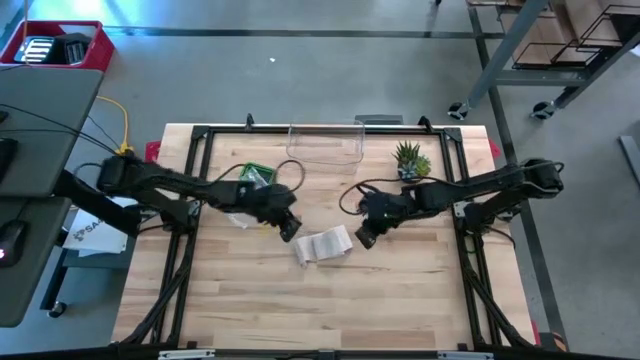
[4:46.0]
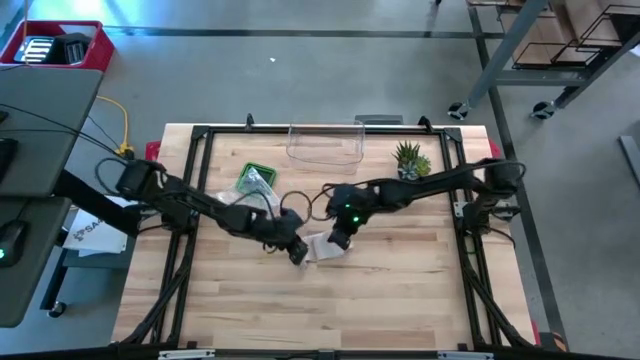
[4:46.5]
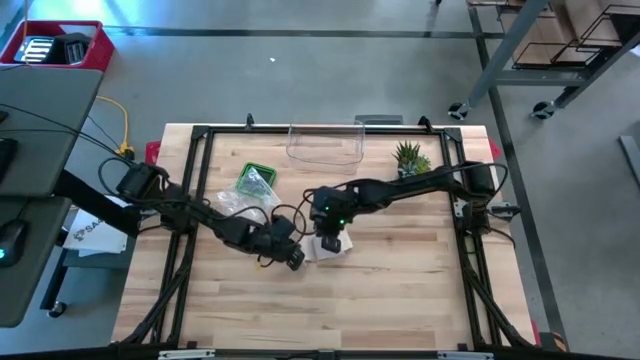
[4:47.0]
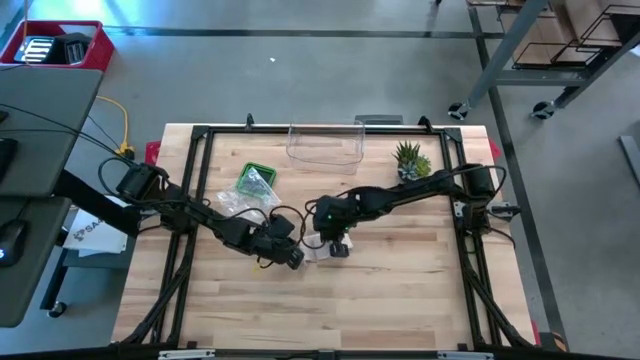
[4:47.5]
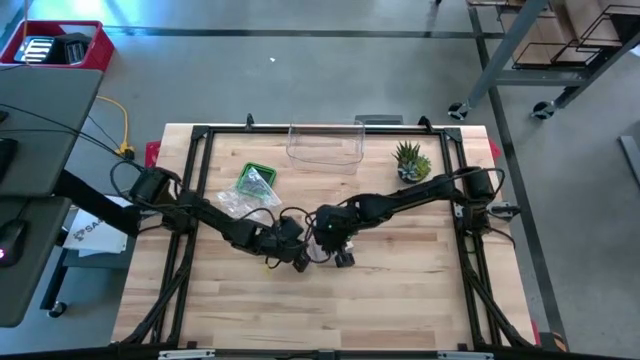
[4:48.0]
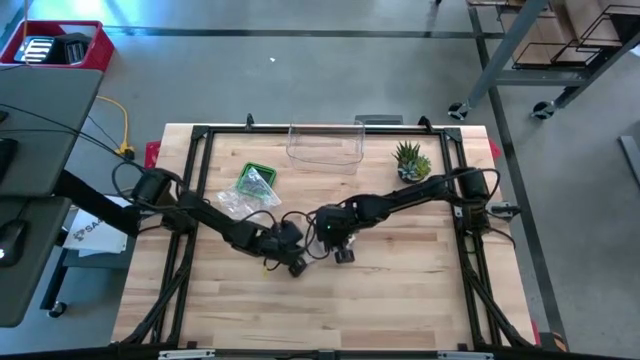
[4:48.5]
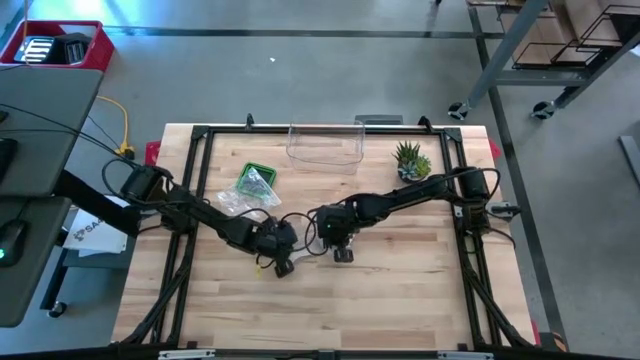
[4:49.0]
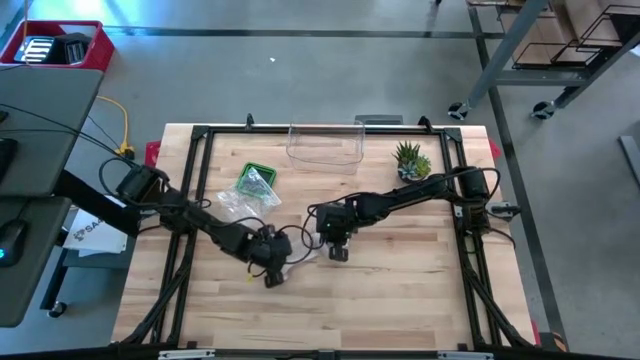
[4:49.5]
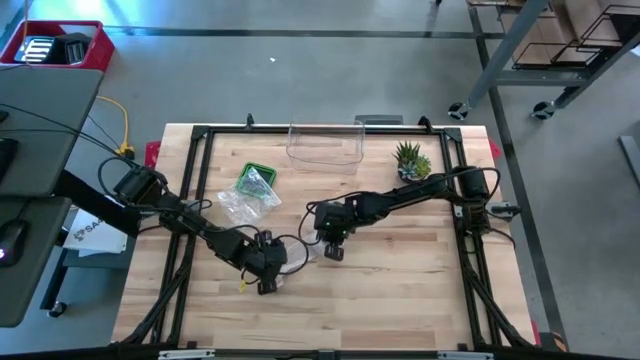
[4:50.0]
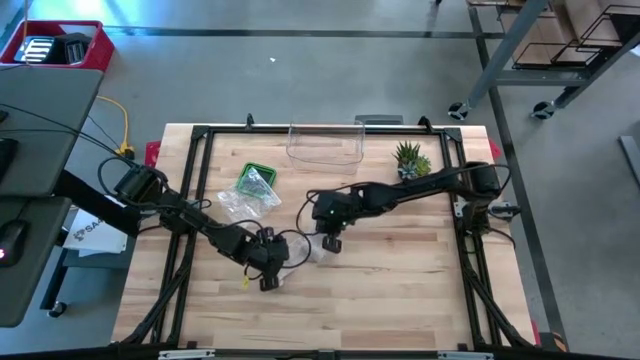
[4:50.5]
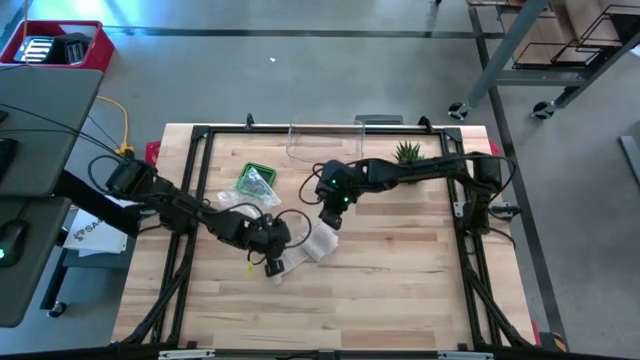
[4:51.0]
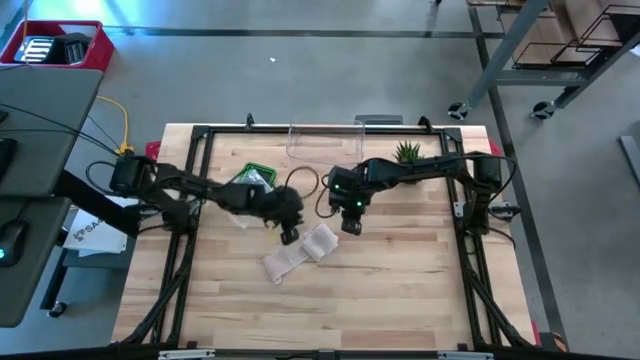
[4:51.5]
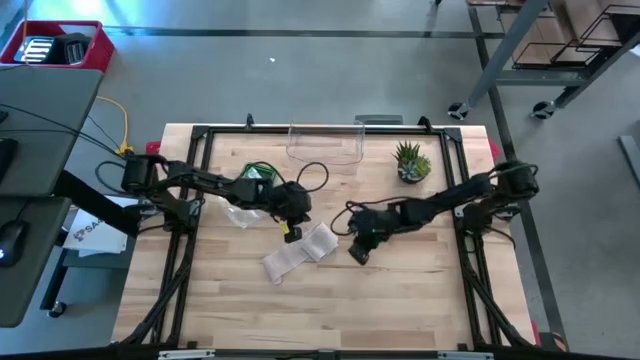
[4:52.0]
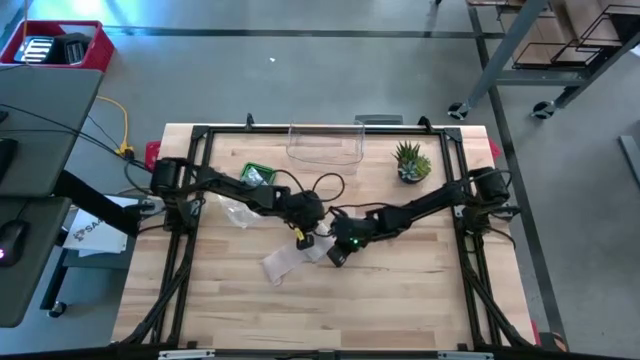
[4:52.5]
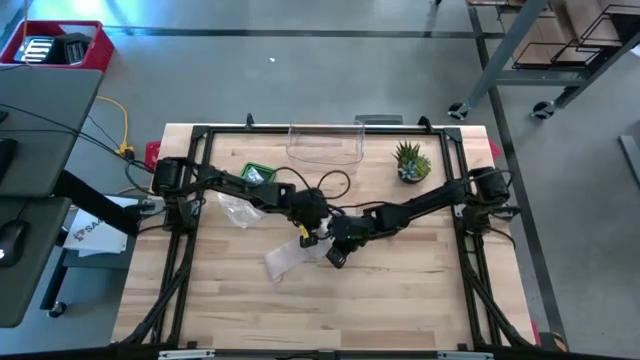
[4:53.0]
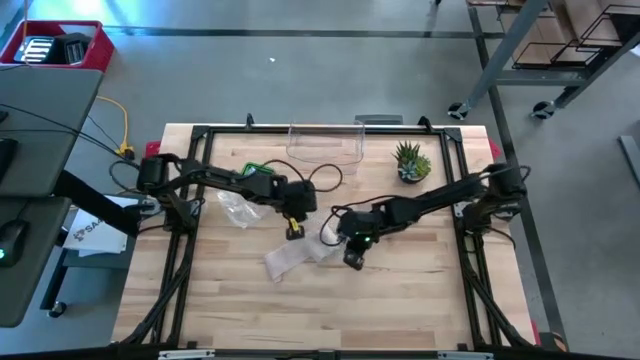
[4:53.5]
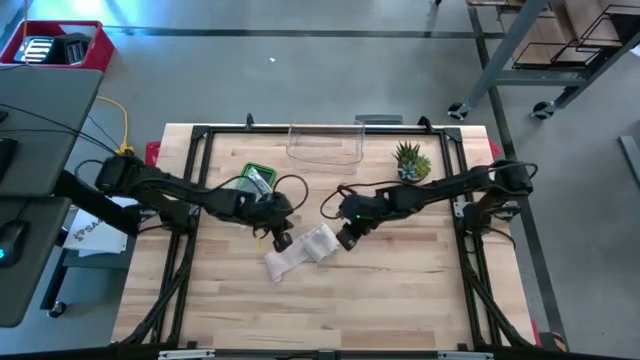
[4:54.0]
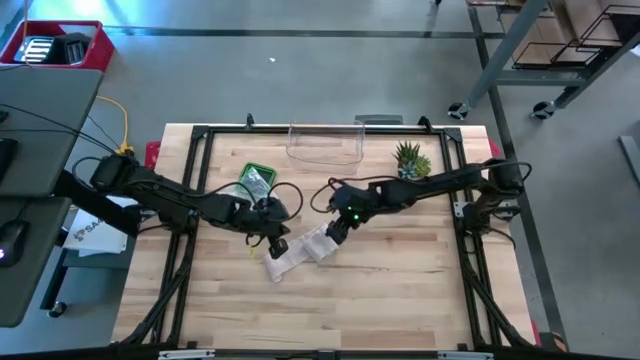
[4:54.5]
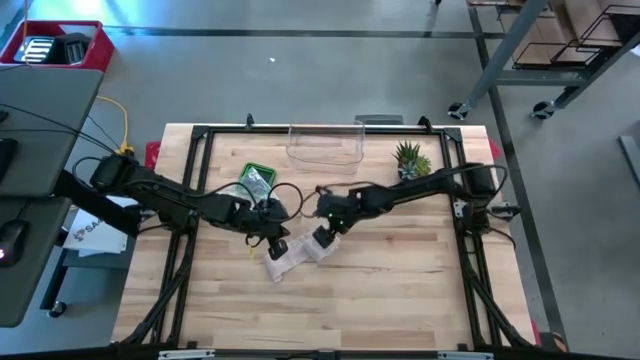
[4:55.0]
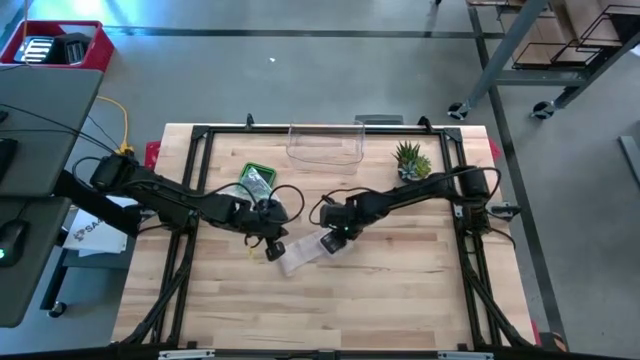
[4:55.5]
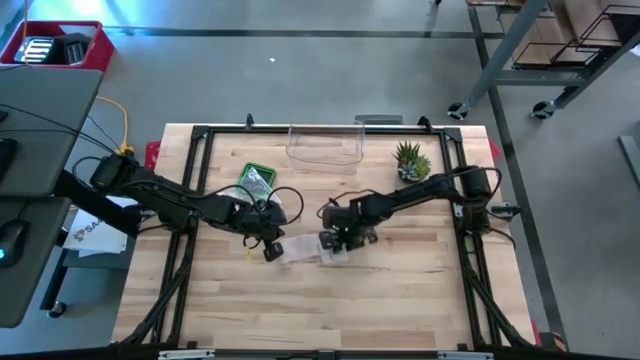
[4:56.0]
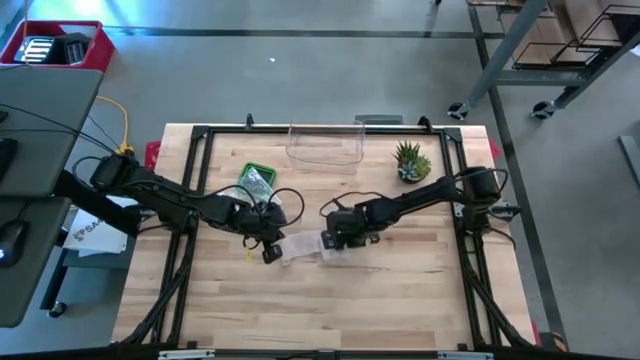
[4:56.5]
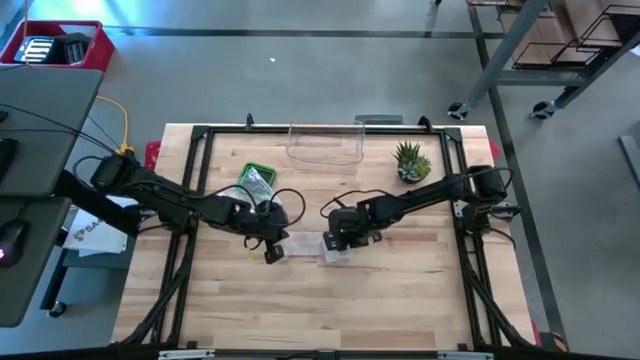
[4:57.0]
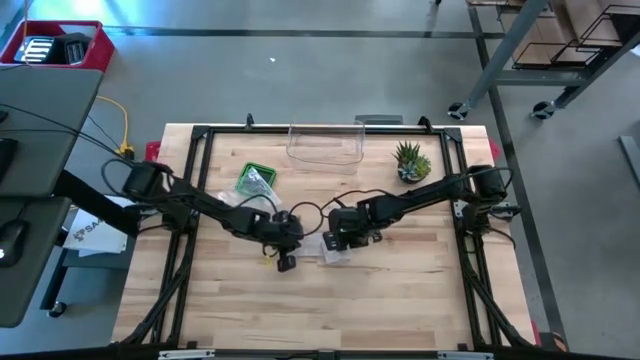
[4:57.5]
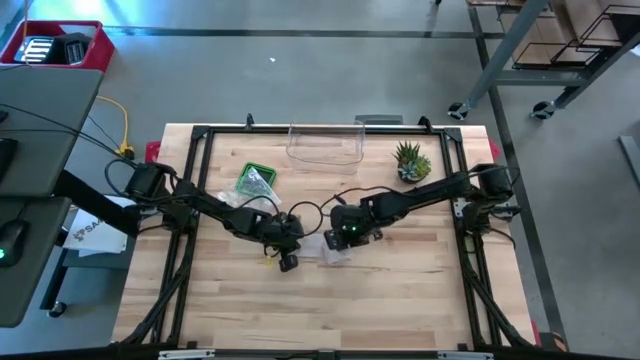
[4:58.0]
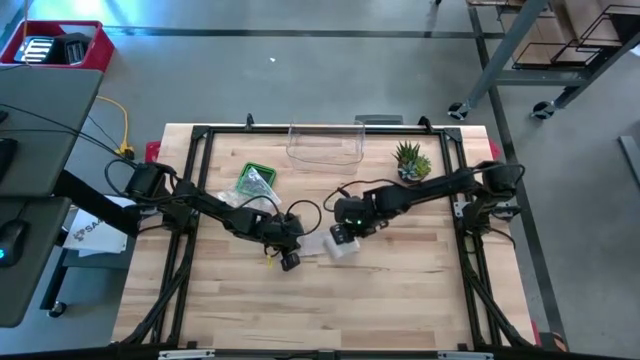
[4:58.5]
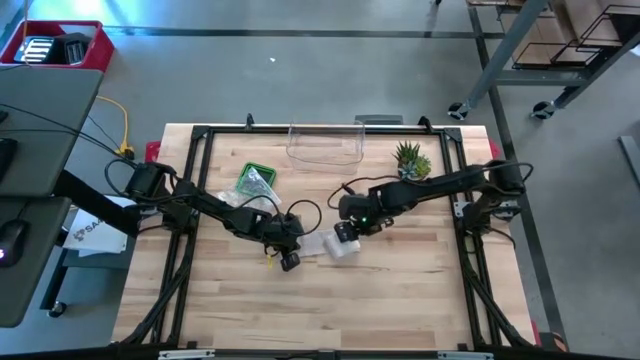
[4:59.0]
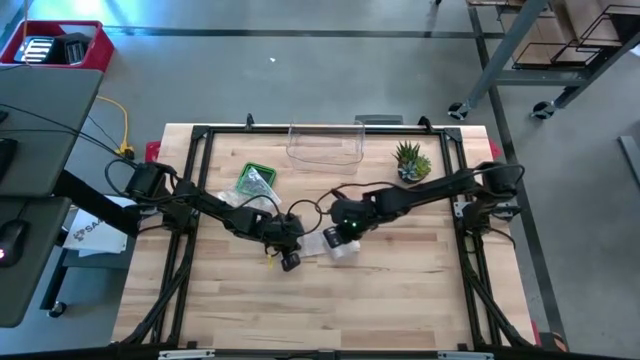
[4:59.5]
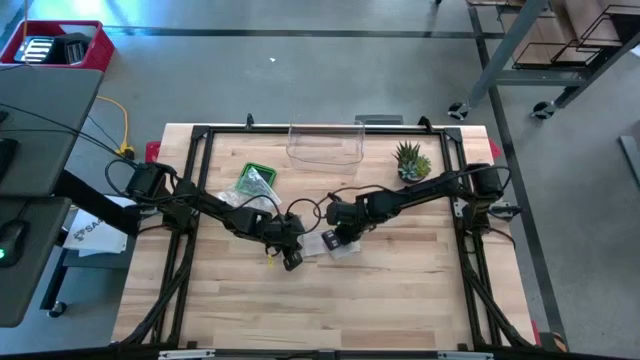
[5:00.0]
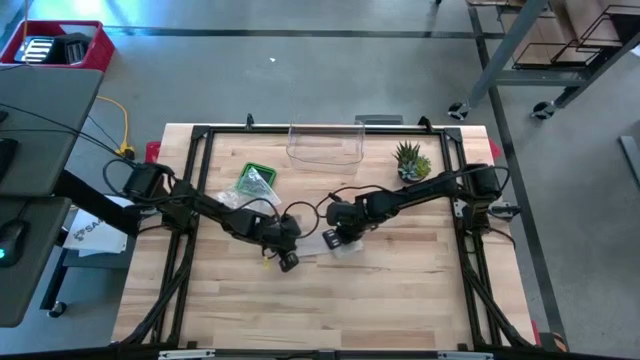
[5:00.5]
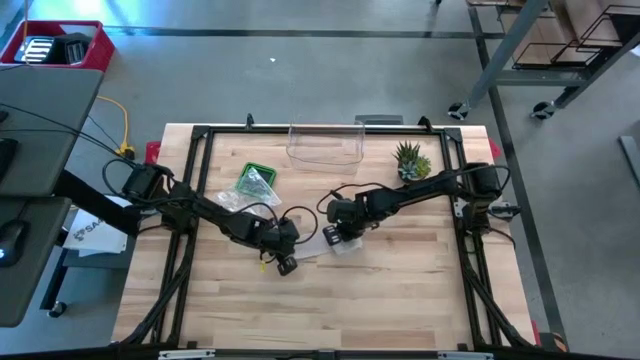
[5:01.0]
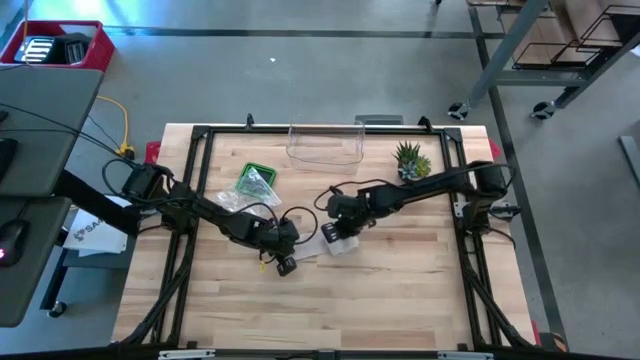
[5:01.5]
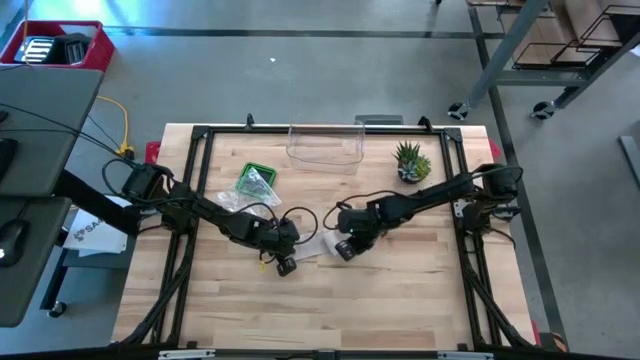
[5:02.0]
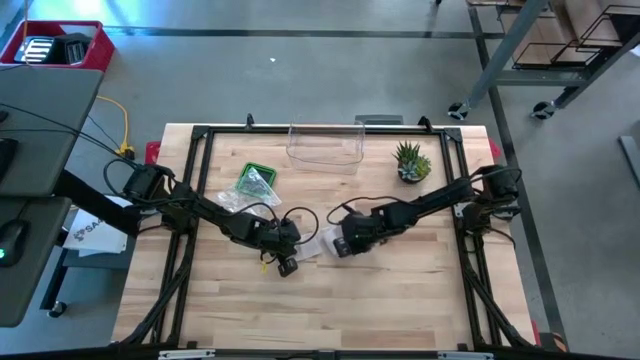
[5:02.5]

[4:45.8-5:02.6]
Task: Roll bandage
Roll the bandage

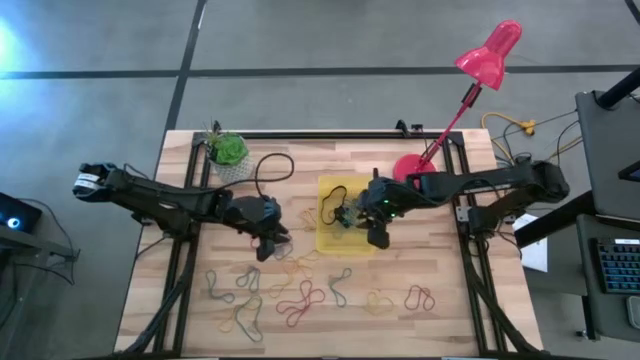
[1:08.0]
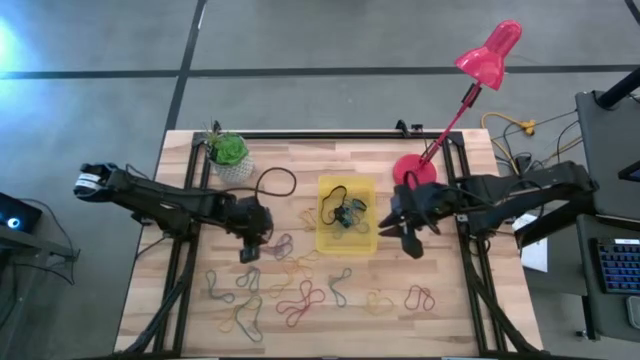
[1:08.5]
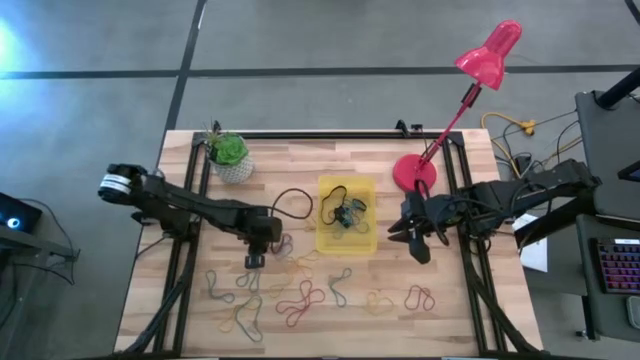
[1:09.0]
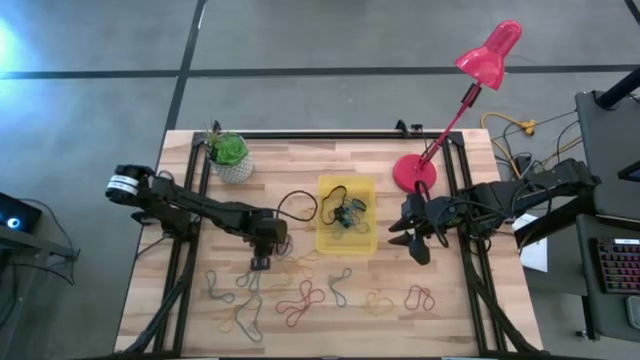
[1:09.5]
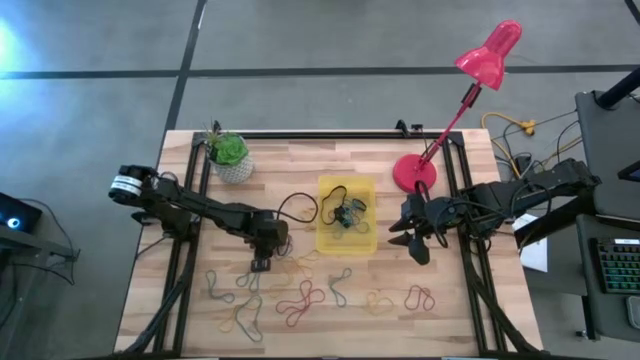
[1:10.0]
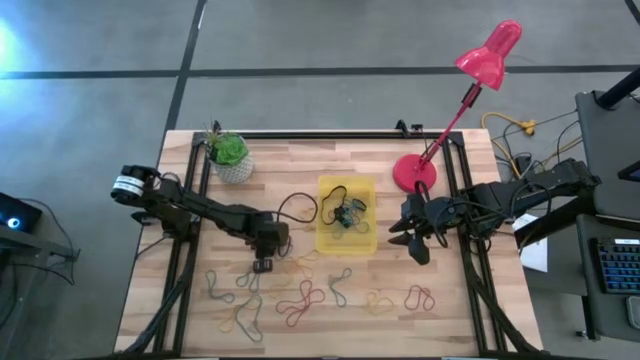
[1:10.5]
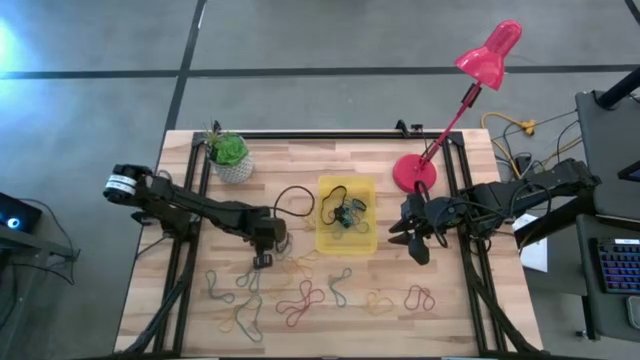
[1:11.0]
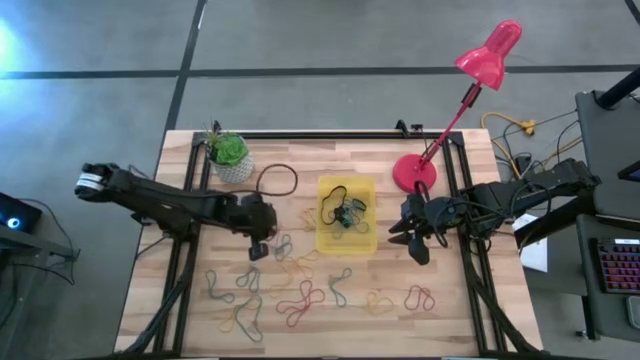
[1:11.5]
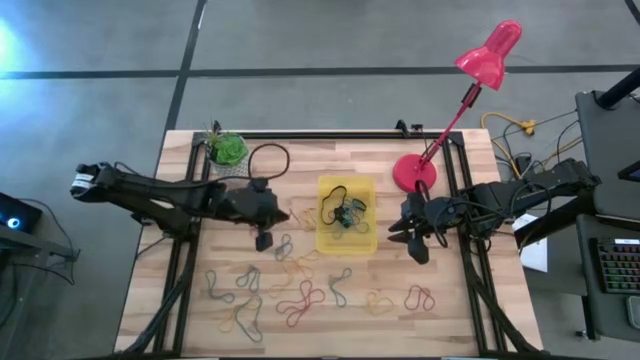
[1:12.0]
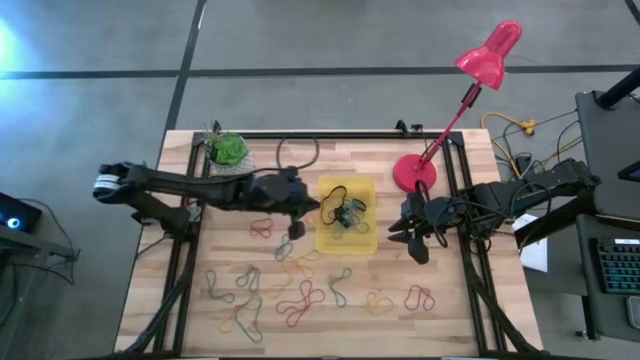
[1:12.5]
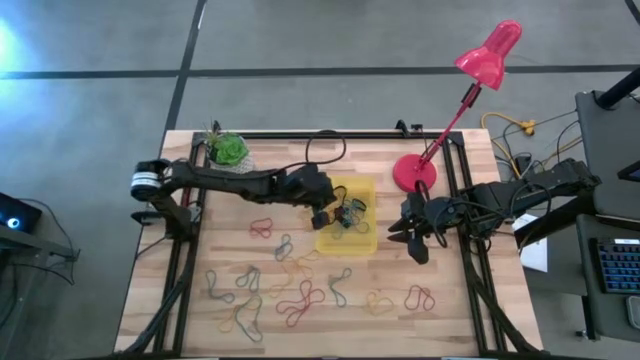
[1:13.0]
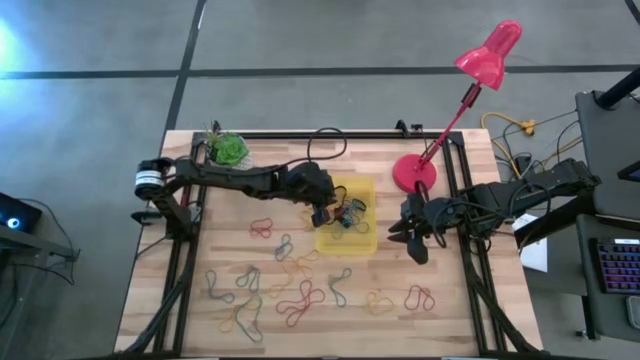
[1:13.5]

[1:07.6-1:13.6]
Task: Pick and place rubber bands into bin
Put the red rubber band into the bin
